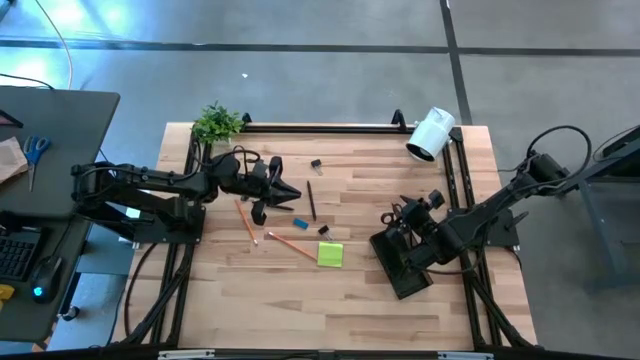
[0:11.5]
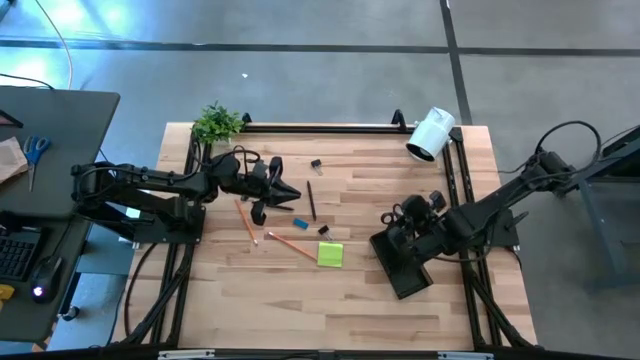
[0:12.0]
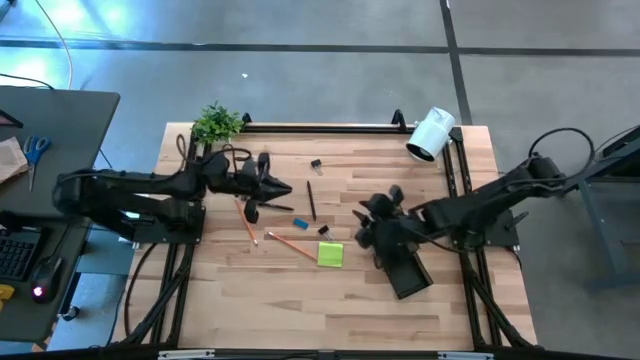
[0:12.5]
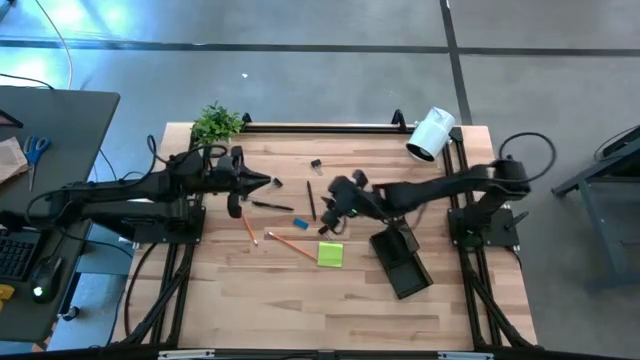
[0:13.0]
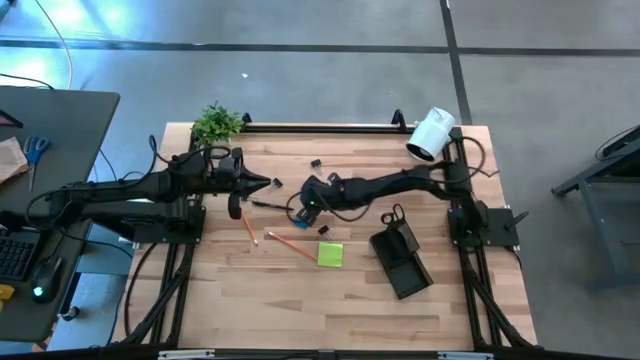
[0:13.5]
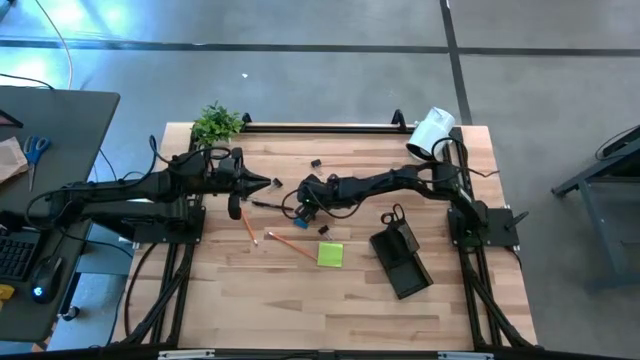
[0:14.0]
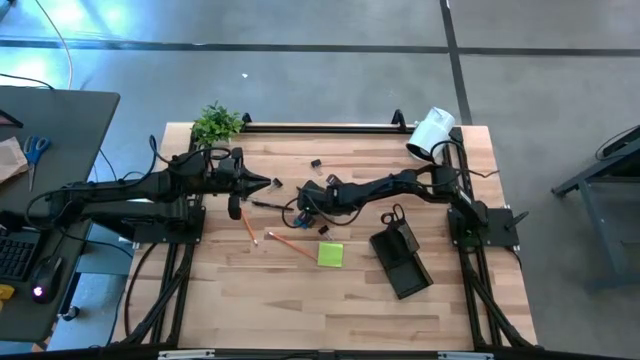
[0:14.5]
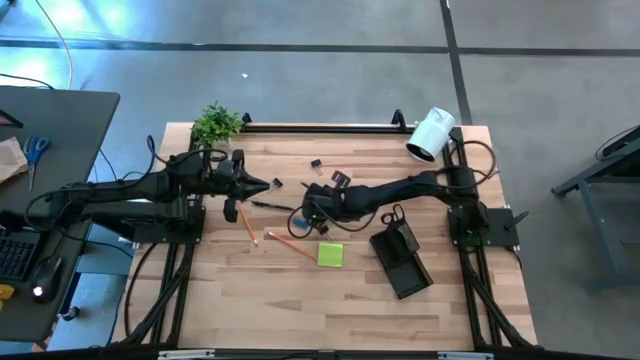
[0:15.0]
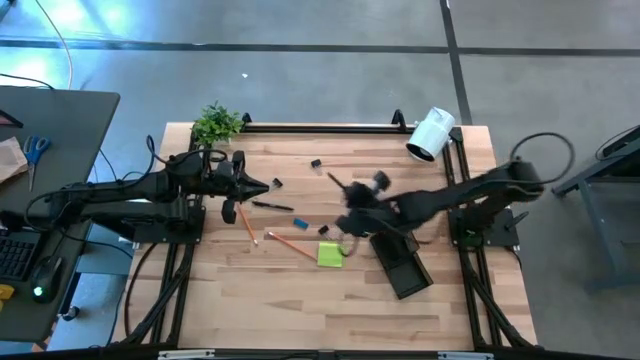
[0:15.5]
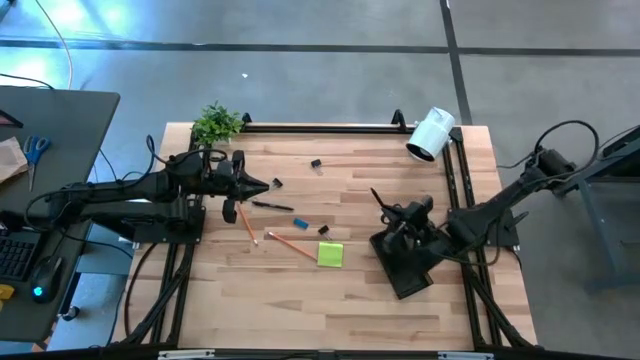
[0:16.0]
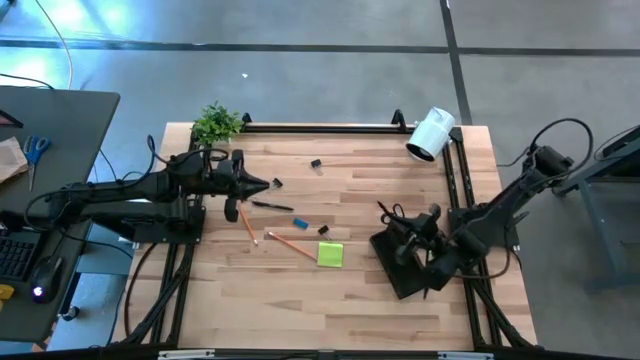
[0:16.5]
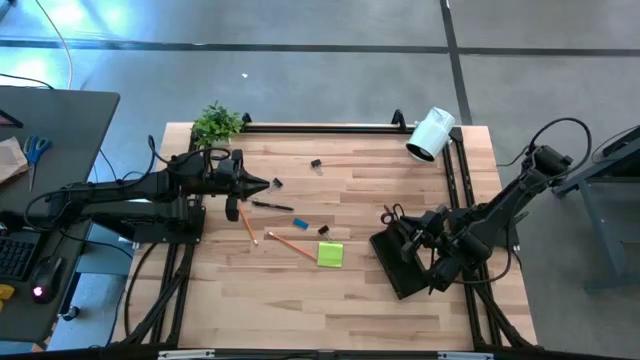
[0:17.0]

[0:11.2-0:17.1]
Task: Pick and place office supplies into organizer
Put the black pen into the black desk organizer

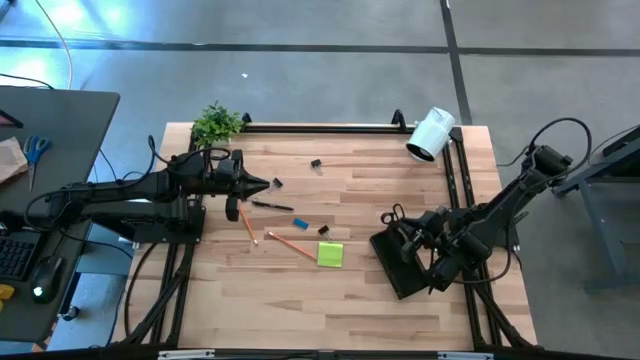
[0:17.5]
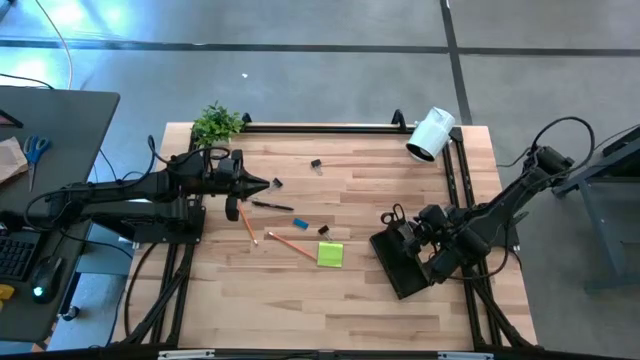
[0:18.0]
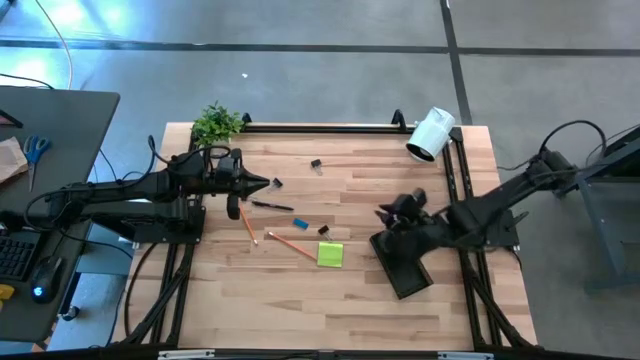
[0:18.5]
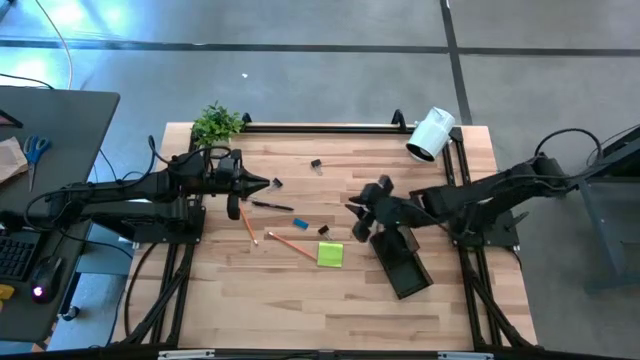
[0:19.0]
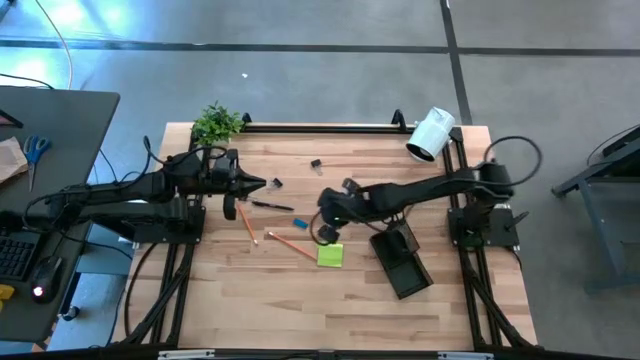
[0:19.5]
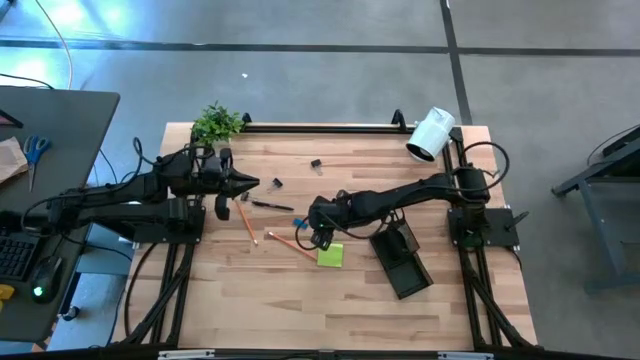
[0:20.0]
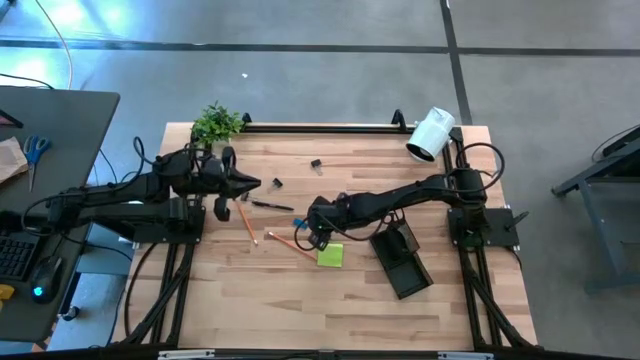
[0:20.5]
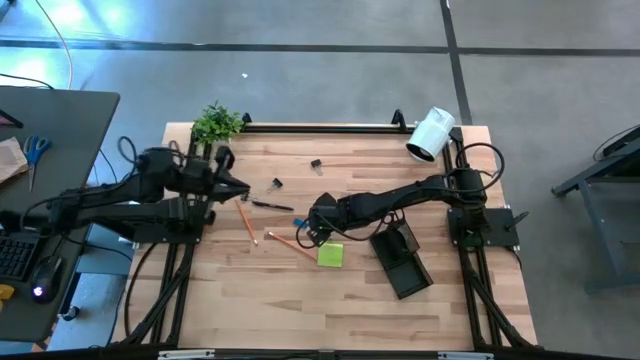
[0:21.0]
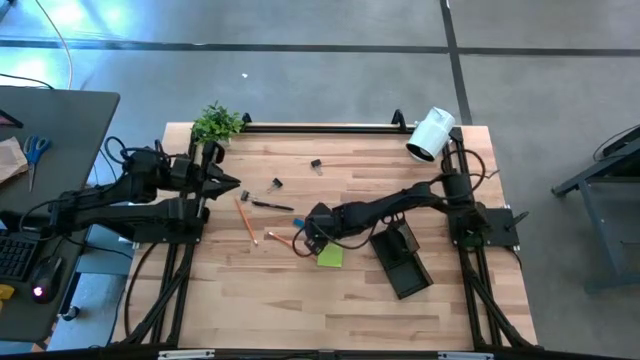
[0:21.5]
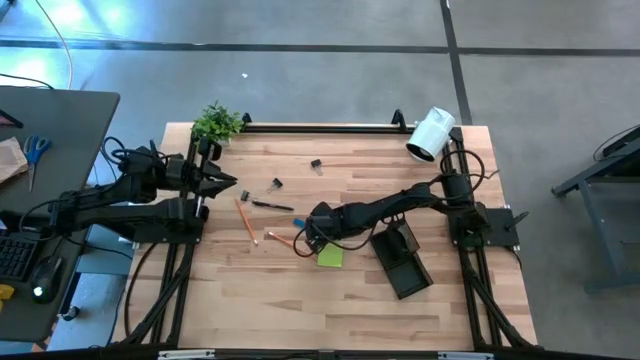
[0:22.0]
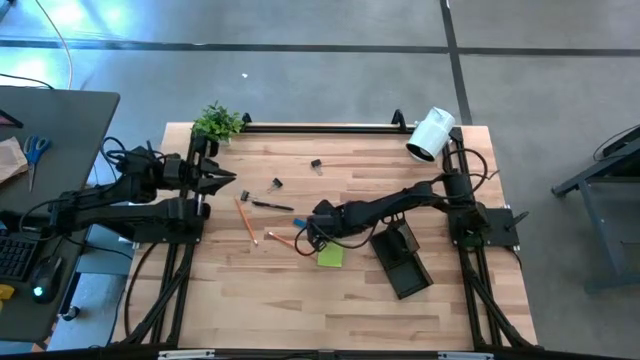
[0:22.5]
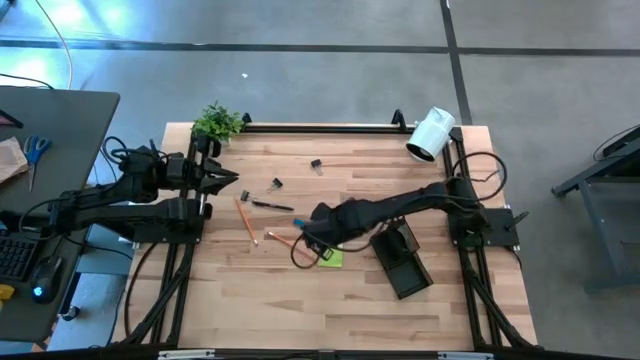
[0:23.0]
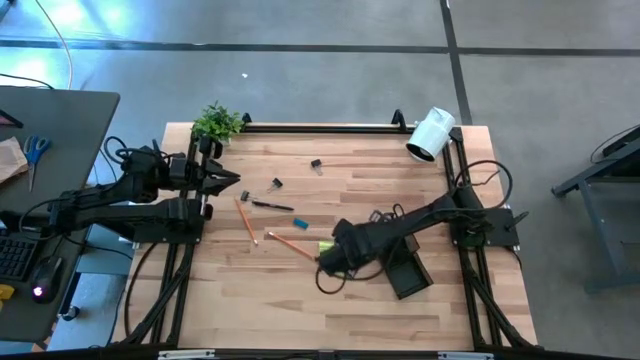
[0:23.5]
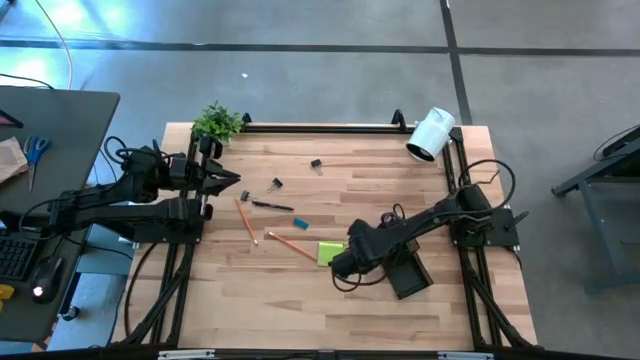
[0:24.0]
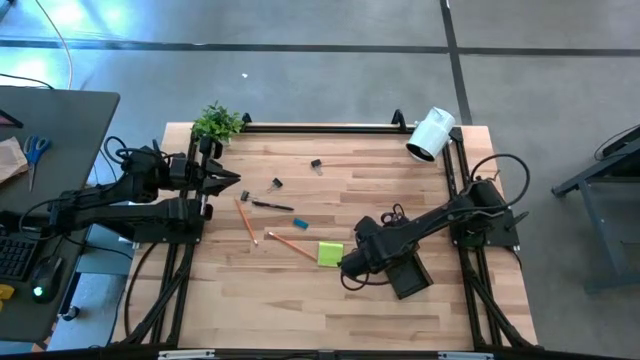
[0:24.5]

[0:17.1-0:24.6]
Put the black binder clip into the black desk organizer

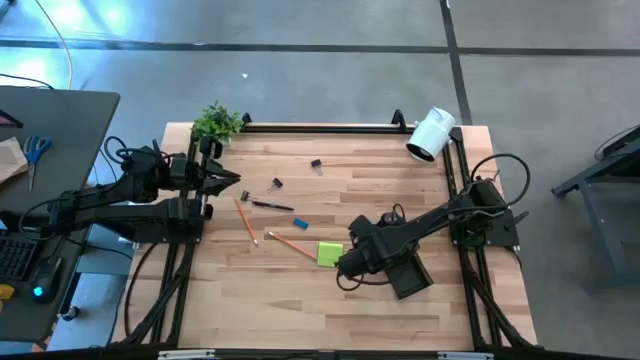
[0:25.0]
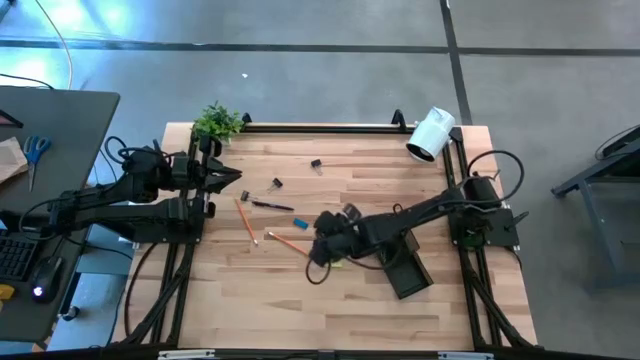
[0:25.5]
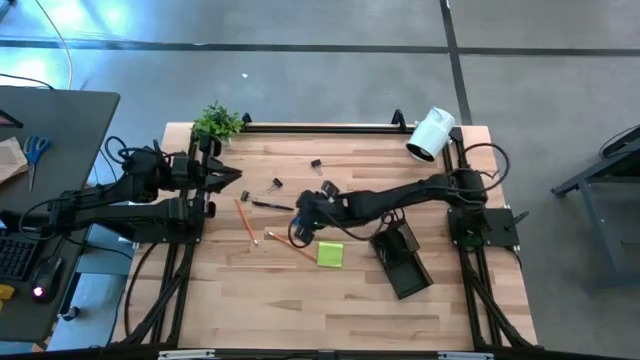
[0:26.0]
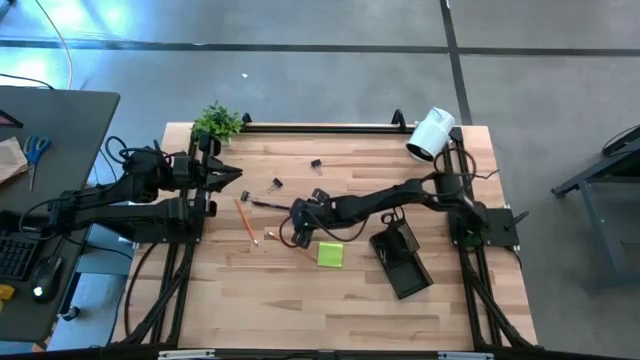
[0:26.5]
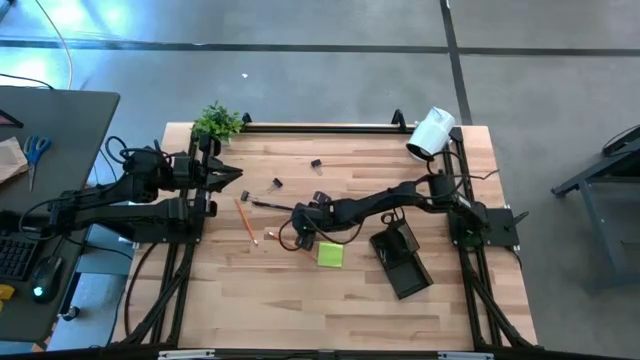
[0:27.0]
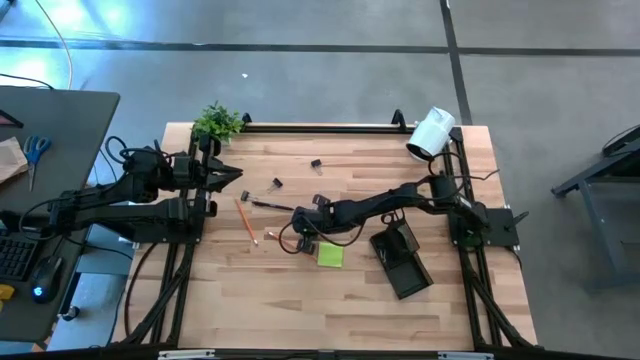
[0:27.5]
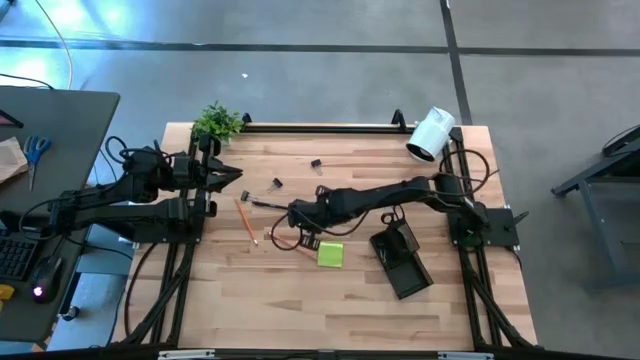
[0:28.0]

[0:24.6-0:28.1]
Put the blue eraser into the black desk organizer

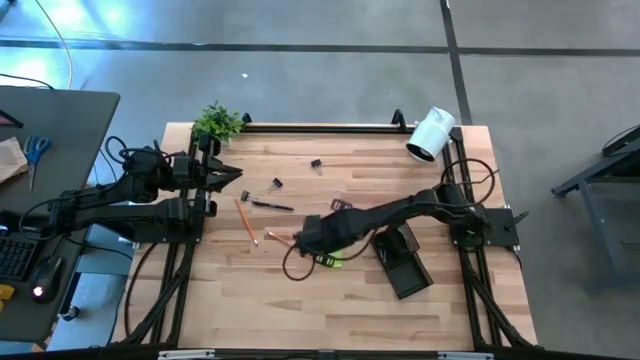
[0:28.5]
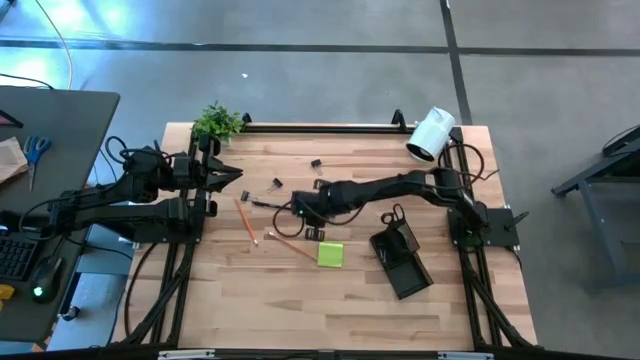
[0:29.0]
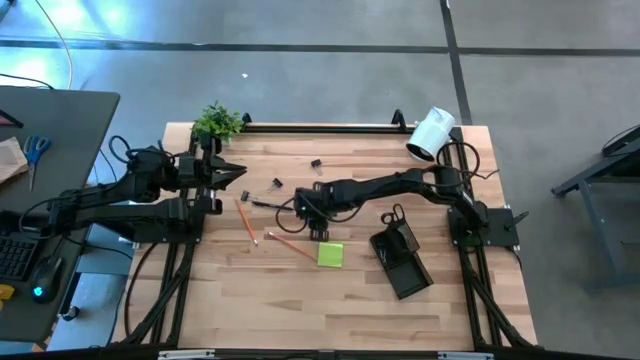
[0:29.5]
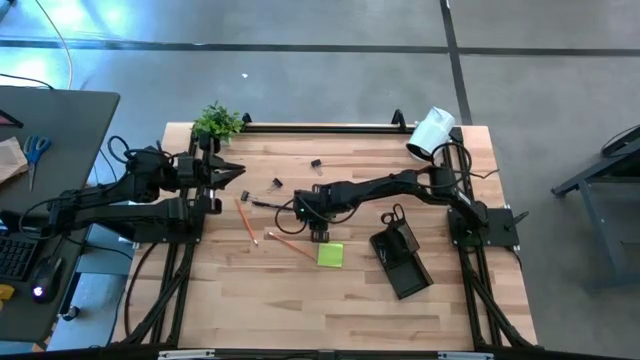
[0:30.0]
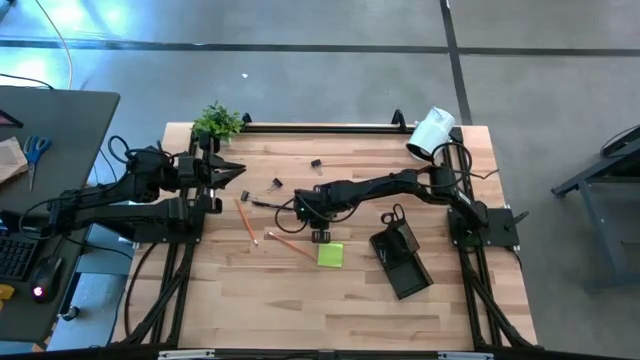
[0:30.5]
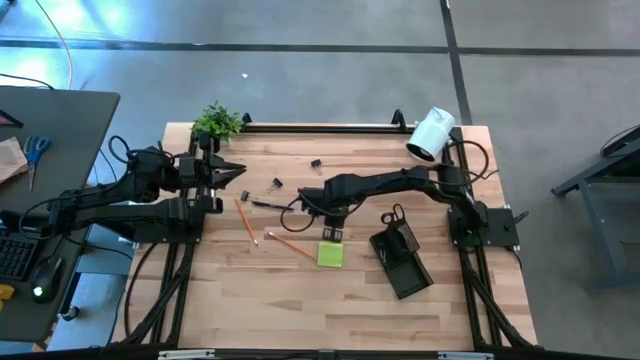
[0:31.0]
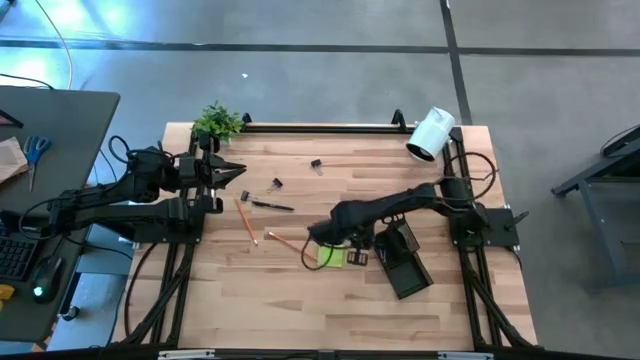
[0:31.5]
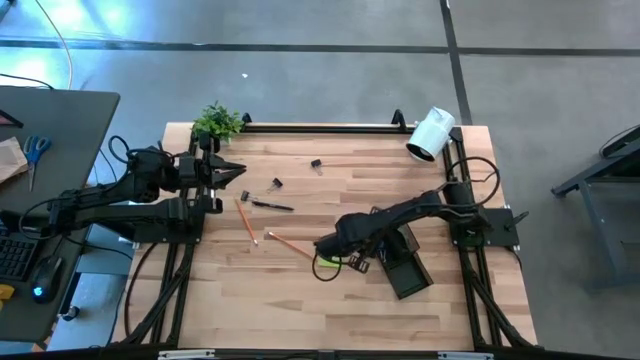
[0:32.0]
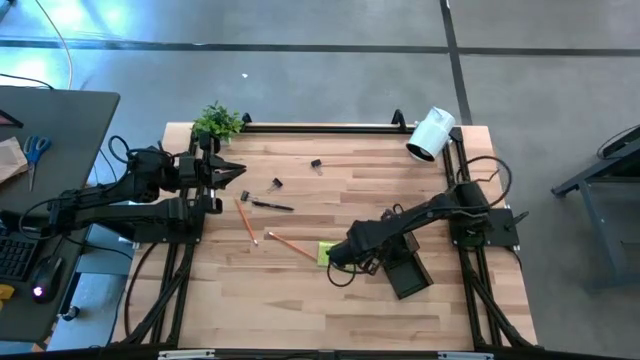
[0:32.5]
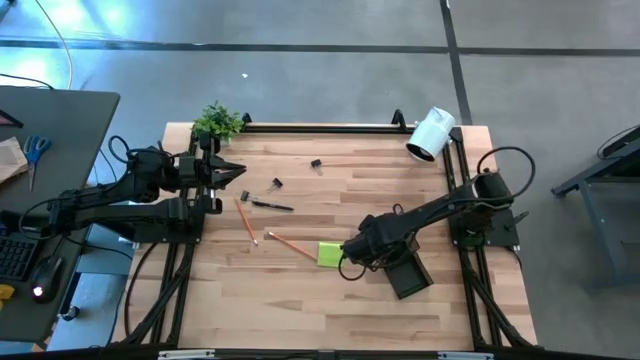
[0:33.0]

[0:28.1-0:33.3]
Put the blue eraser into the black desk organizer
